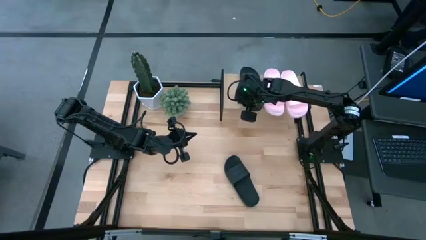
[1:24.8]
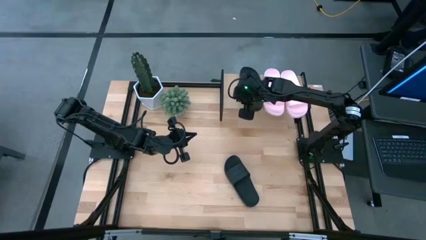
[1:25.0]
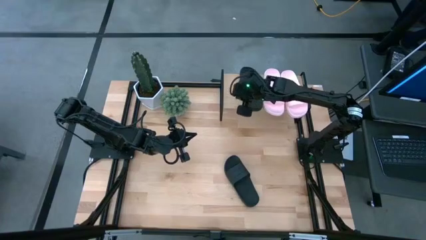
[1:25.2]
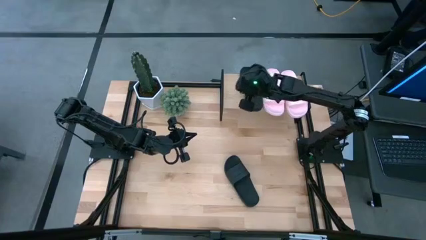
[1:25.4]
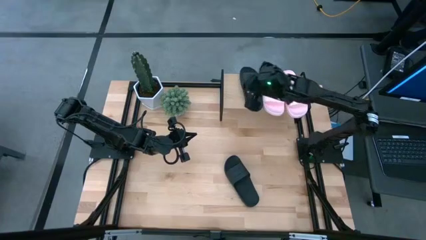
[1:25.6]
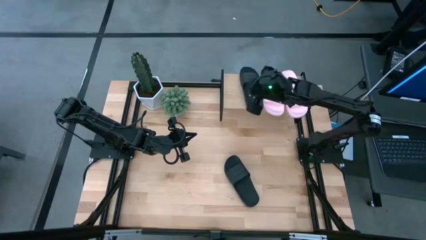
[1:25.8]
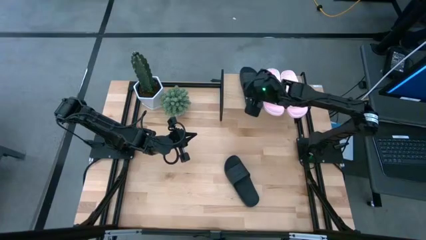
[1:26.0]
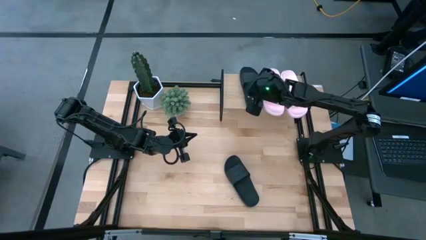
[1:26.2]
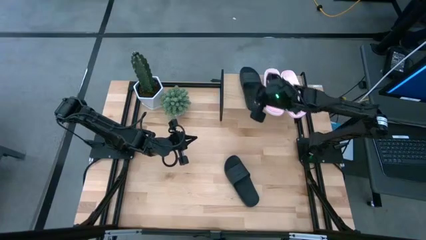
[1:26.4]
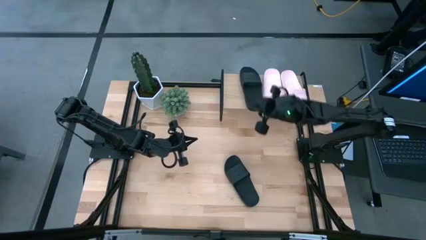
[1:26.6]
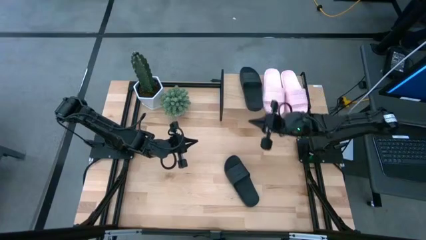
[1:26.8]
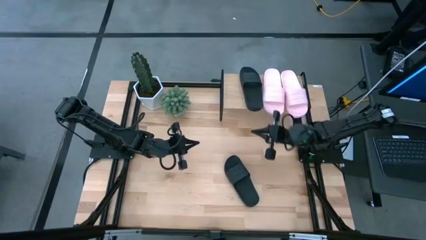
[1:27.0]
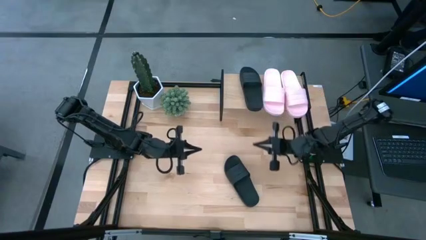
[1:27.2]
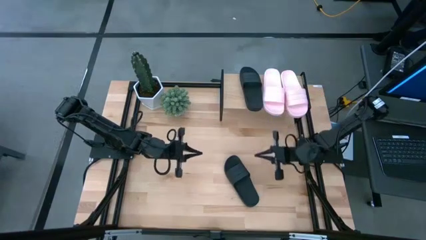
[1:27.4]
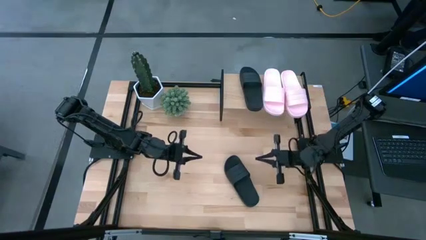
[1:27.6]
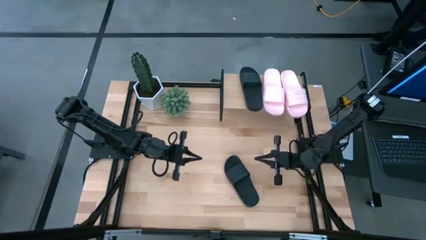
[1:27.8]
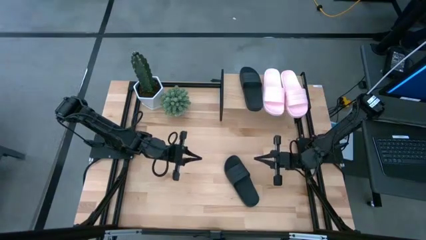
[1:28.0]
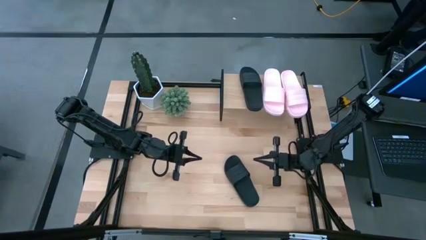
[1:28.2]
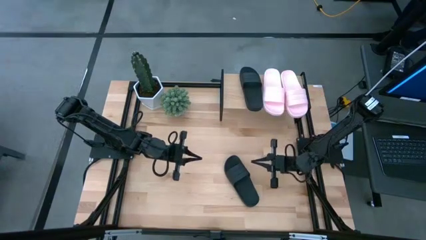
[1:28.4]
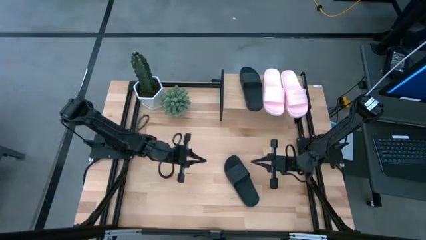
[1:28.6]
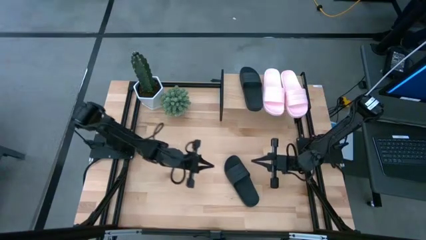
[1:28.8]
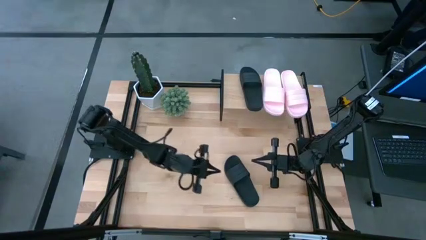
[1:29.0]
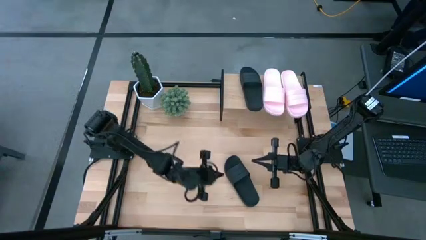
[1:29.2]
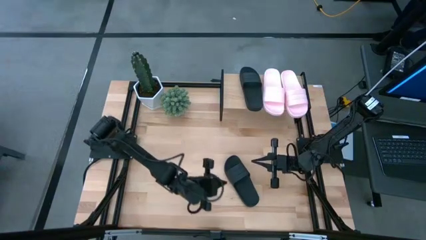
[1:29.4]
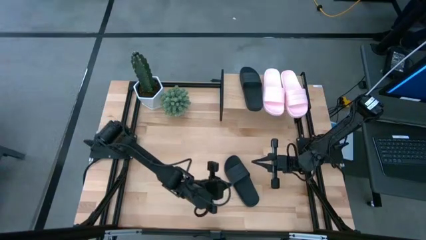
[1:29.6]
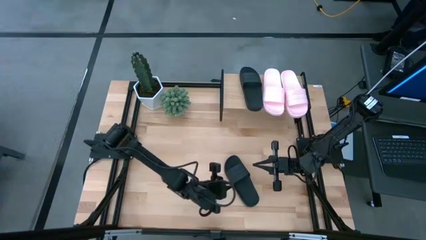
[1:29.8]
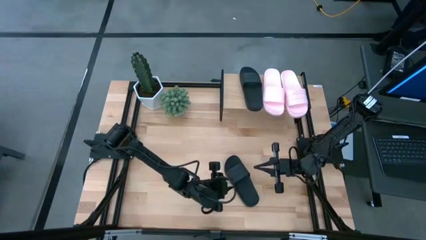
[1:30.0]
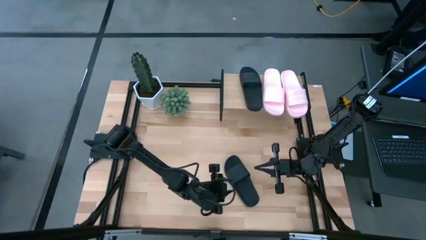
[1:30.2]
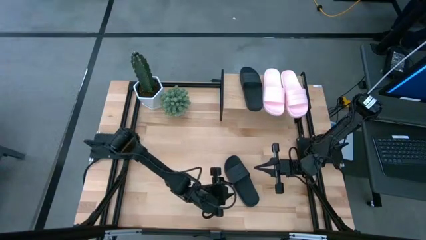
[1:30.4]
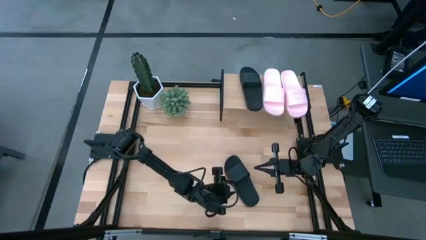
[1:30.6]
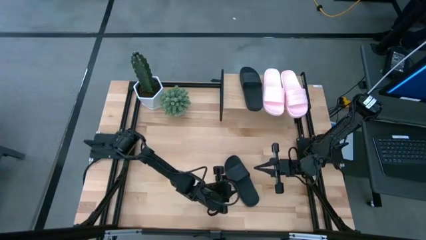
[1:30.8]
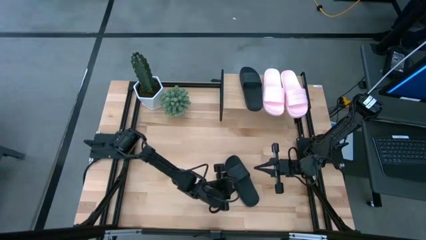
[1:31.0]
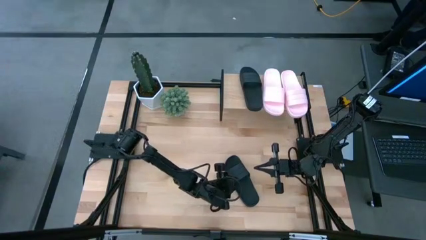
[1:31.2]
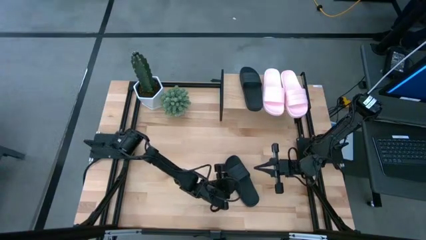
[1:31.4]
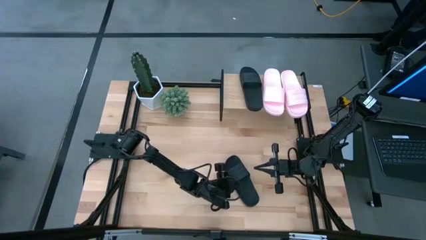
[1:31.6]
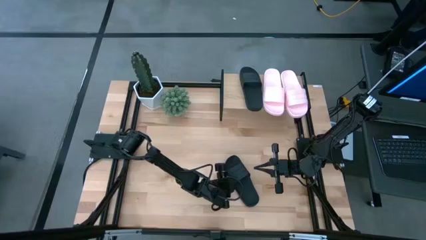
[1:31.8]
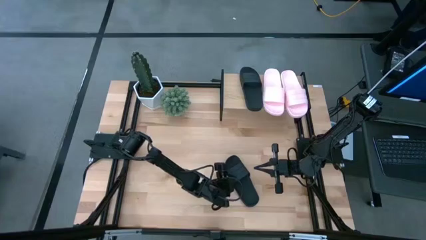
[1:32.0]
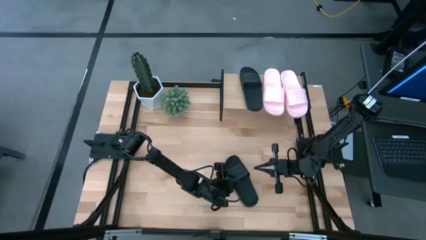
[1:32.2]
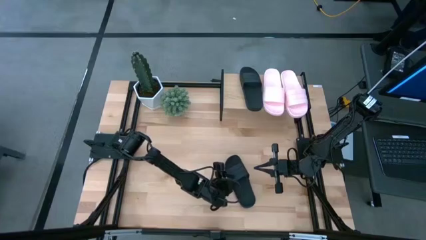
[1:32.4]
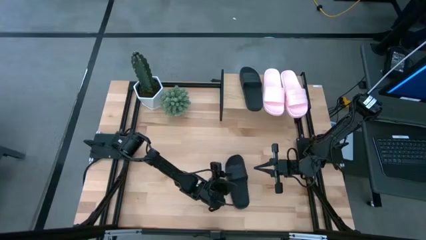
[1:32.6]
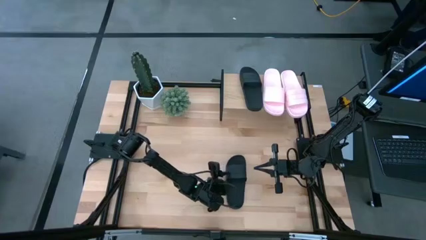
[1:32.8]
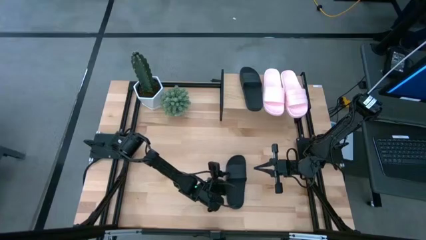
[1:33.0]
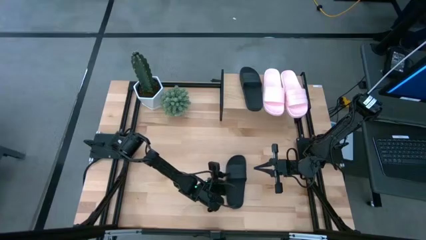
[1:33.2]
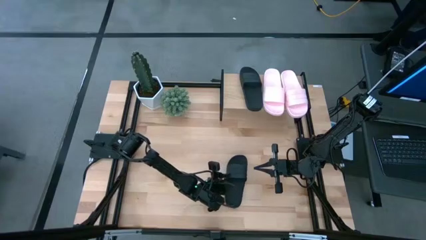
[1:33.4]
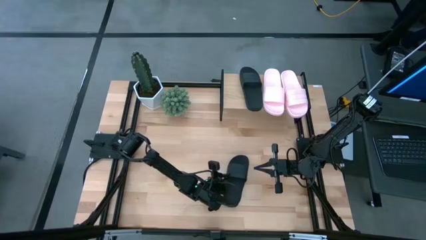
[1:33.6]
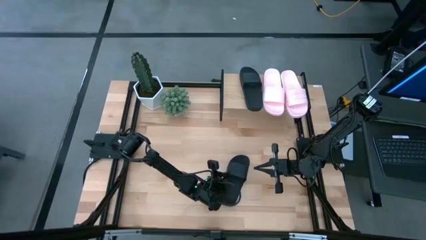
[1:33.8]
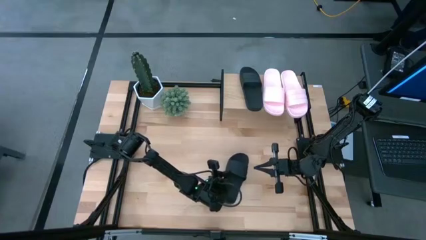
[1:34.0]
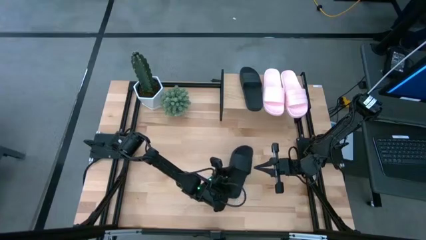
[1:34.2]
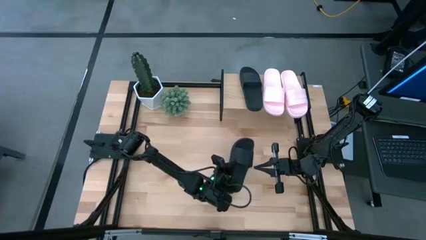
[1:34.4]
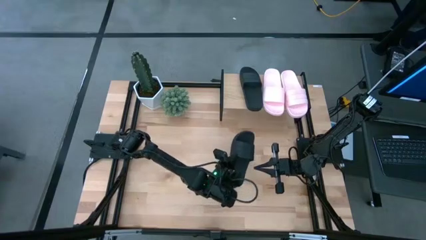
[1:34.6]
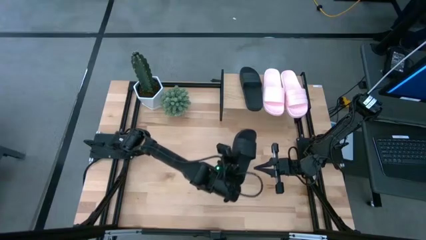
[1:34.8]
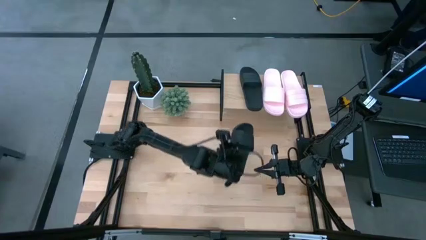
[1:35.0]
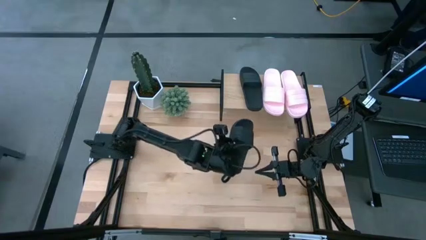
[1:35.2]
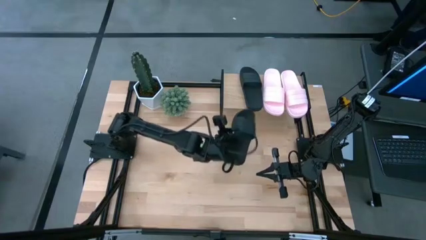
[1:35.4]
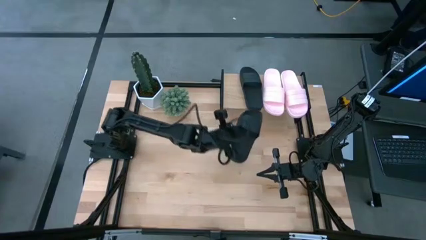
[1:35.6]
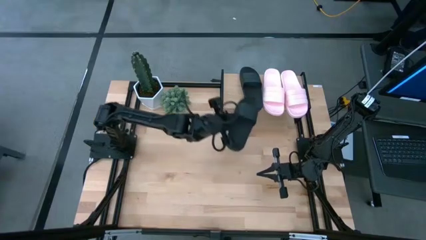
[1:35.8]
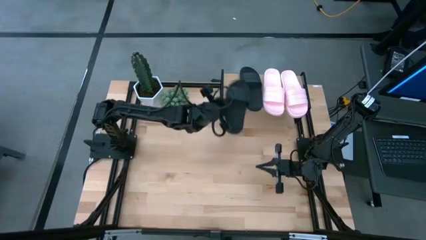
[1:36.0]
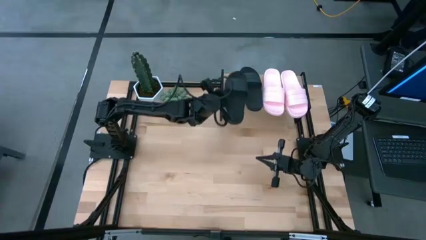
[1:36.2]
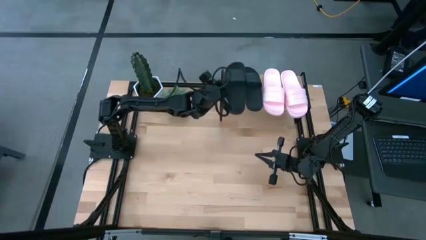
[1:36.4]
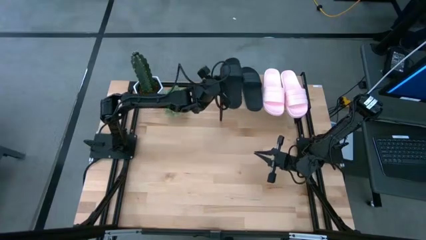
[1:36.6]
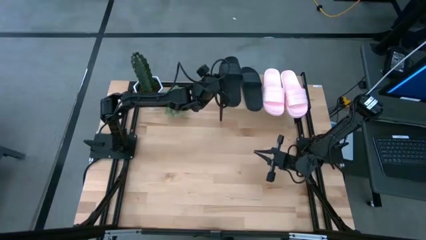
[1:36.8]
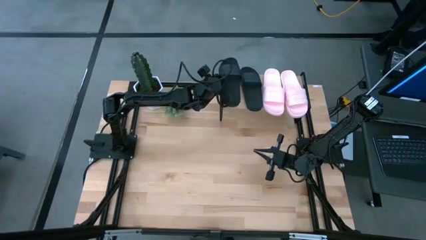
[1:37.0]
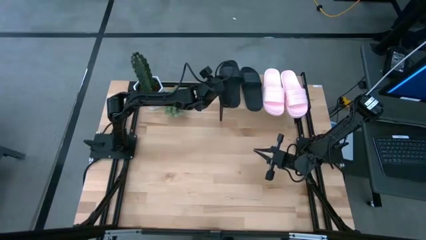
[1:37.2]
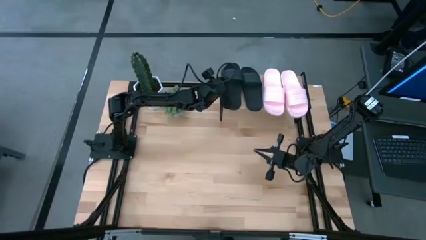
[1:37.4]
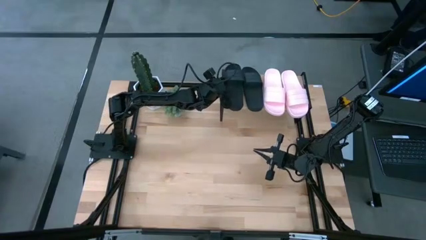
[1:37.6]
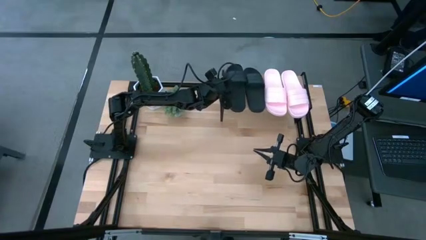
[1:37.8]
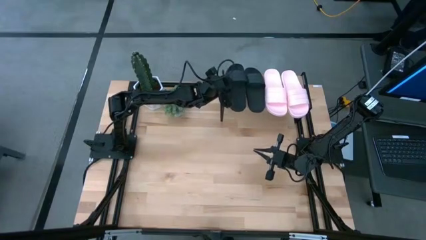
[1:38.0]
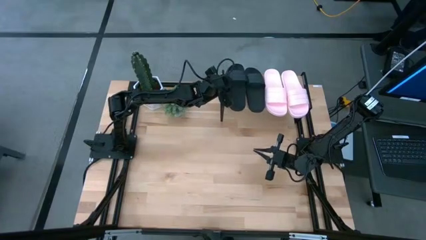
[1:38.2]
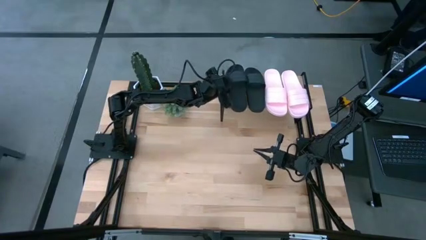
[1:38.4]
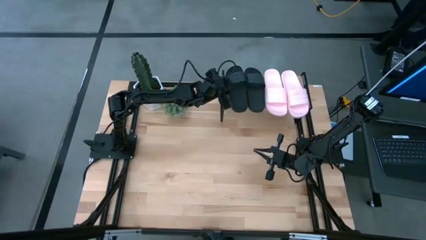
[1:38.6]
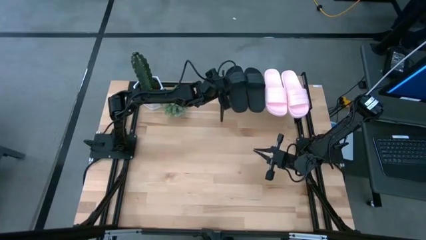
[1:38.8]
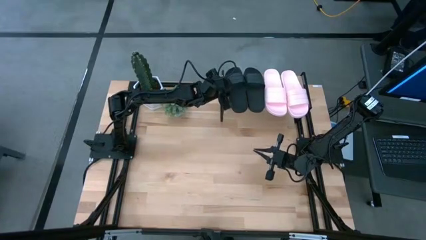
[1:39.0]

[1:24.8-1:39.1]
Task: Pick and place slides into the shelf
Put the black slides on the shelf
